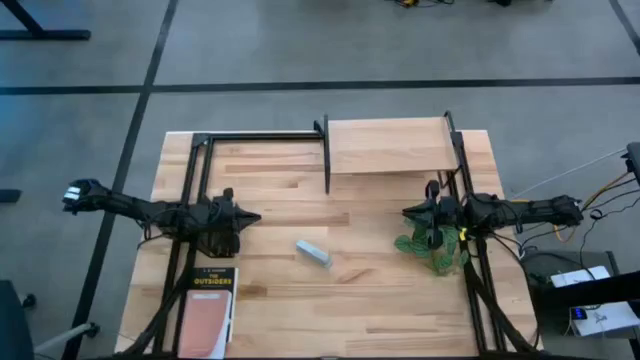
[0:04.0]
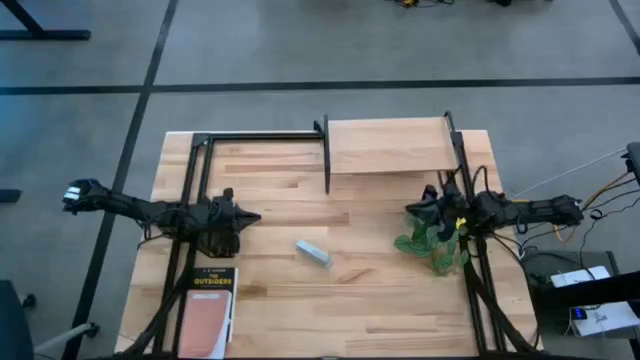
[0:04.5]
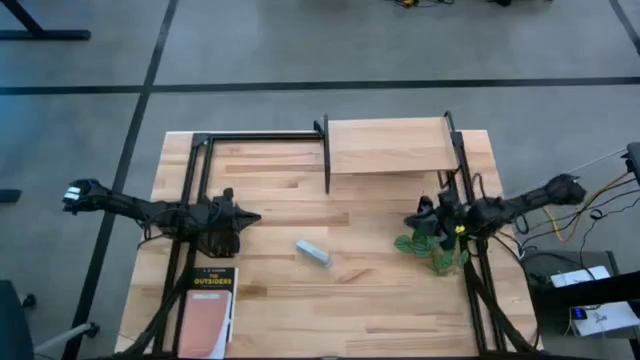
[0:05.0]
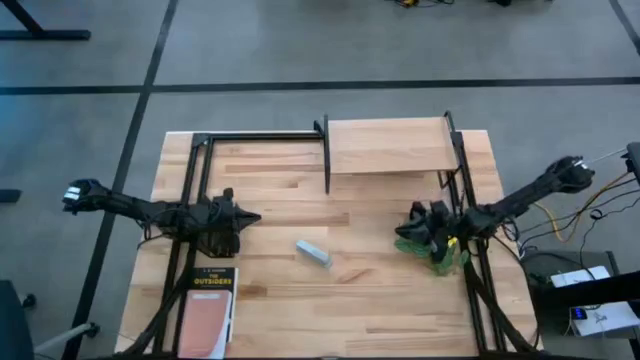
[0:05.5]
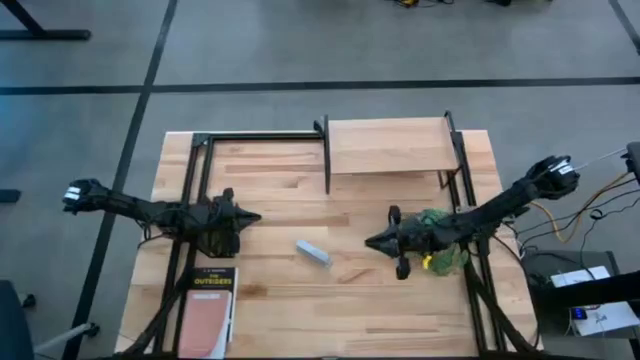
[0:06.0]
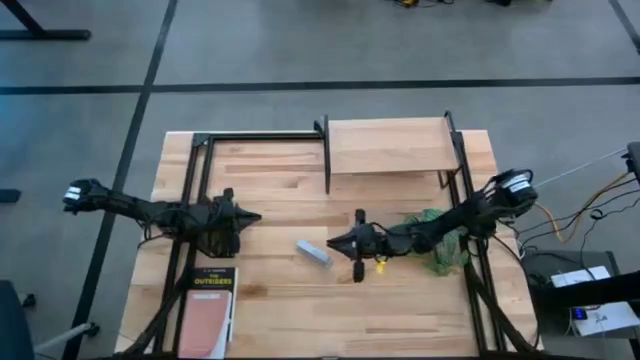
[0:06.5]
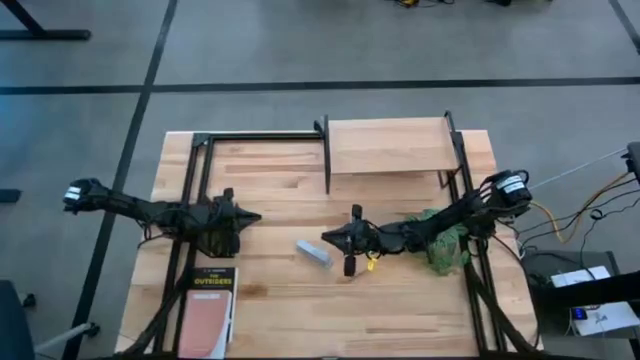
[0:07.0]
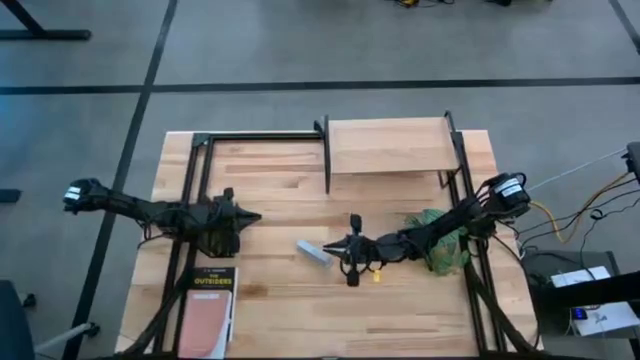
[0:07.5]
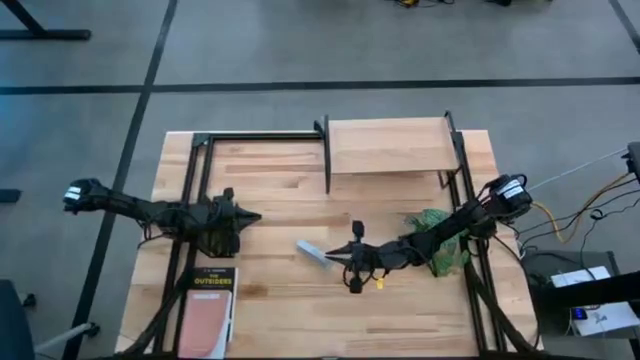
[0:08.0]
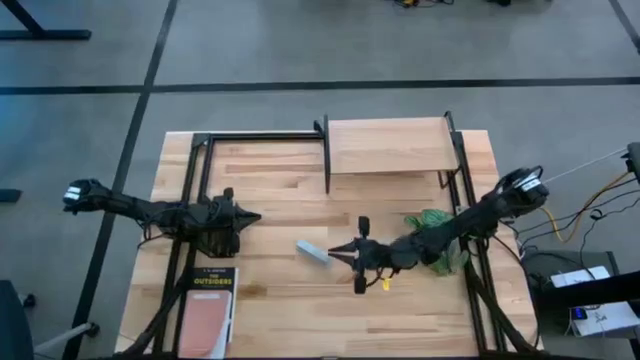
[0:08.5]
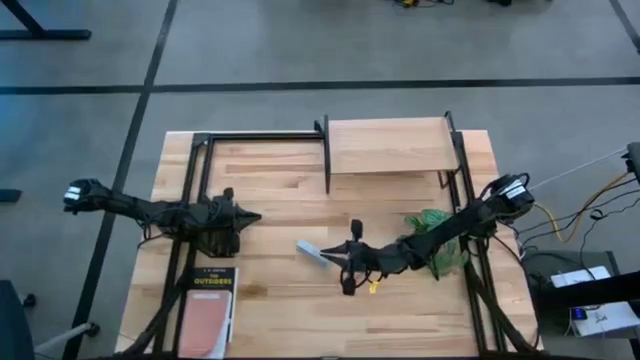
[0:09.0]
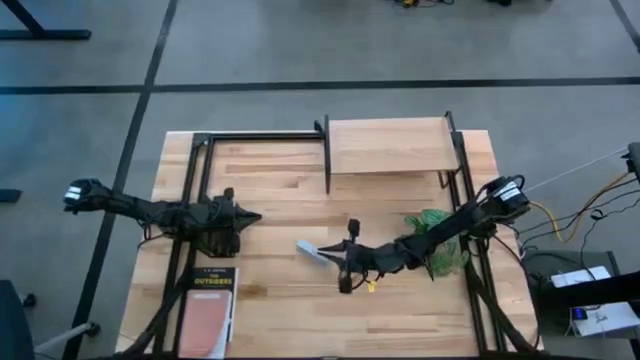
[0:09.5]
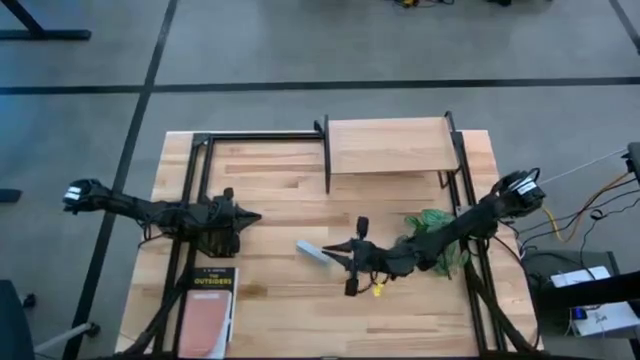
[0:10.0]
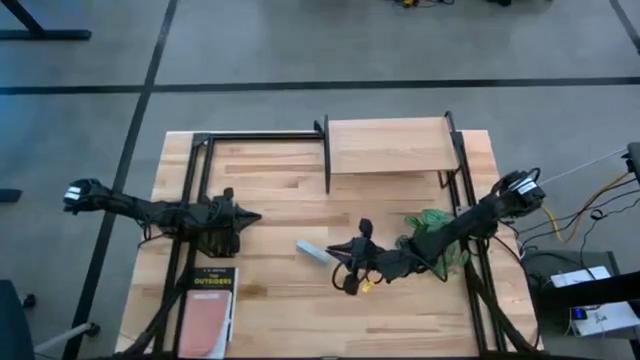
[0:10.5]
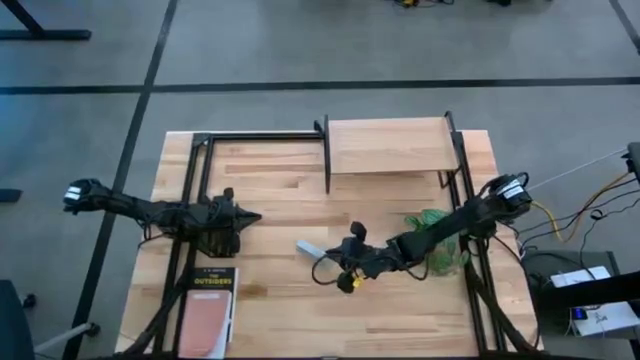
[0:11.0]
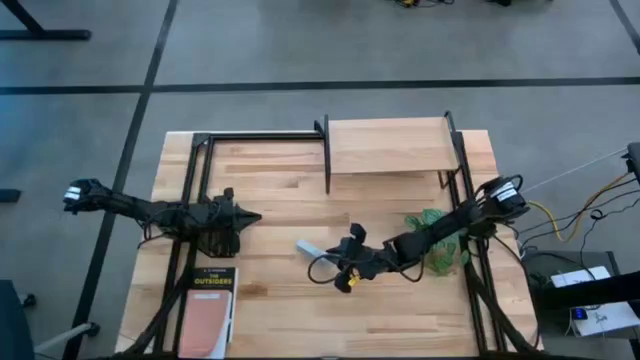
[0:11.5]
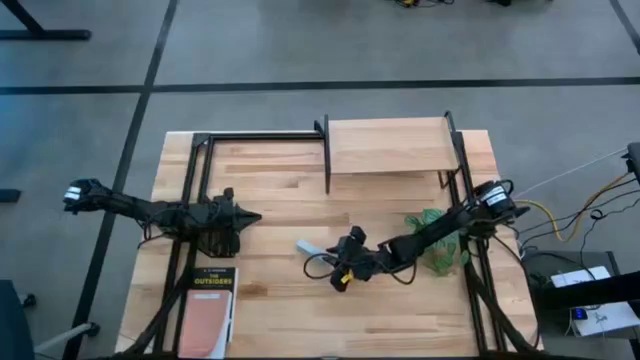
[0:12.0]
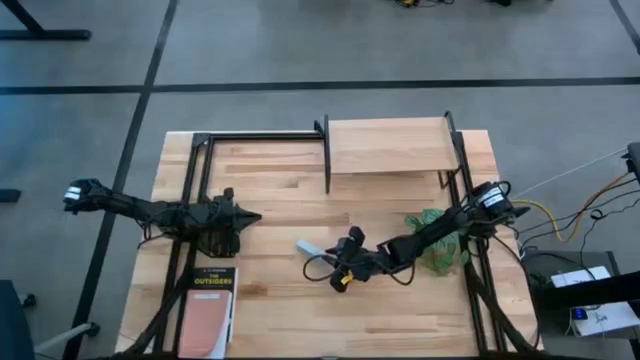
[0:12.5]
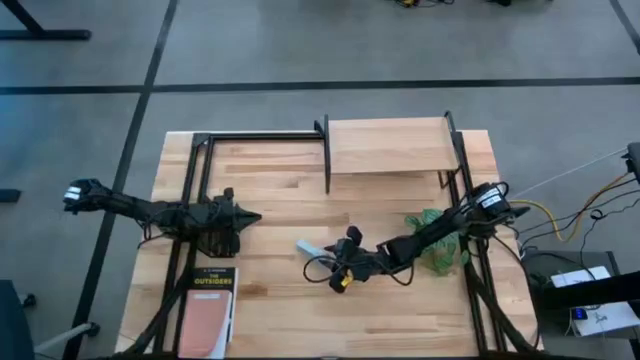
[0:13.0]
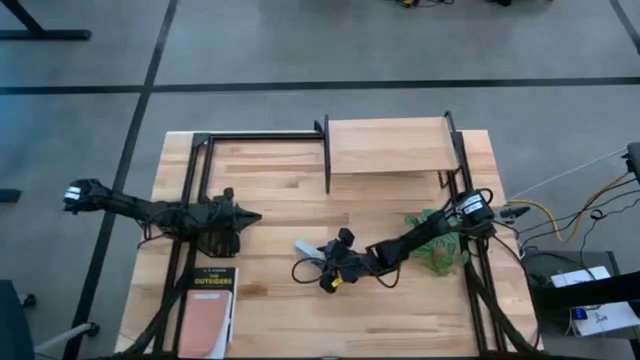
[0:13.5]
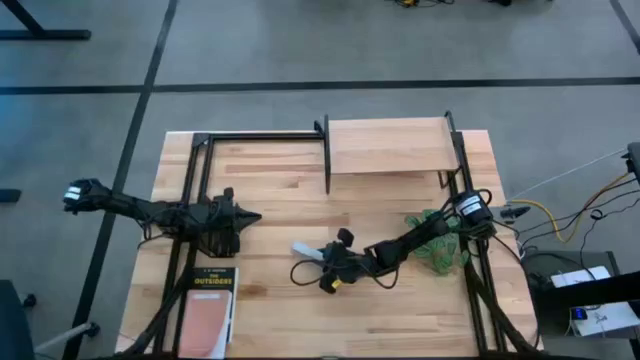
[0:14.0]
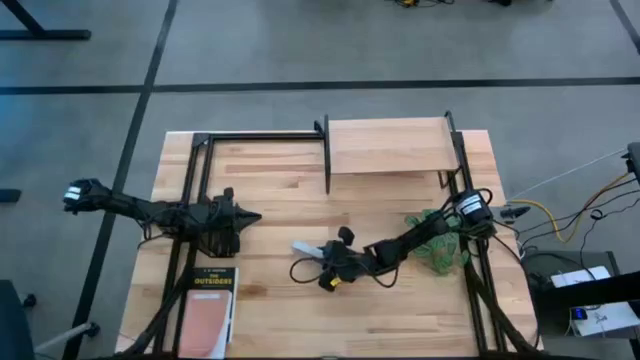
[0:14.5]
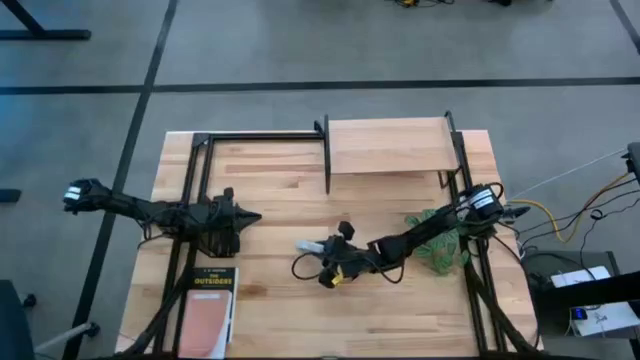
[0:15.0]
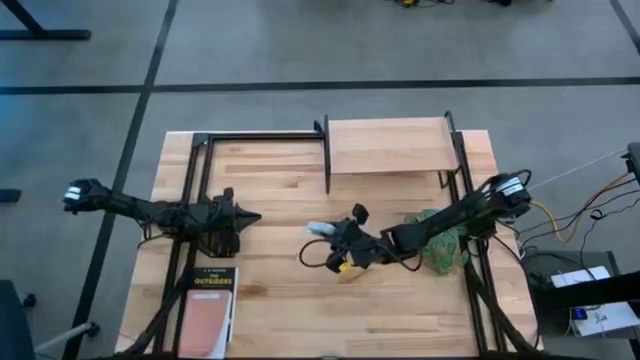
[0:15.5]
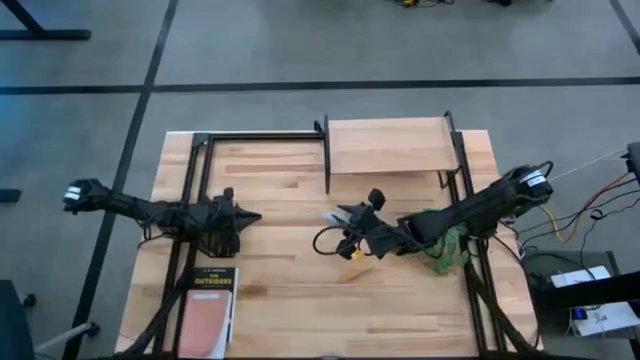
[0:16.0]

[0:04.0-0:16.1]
Task: Stock shelves
Put the gray stapler on the shelf

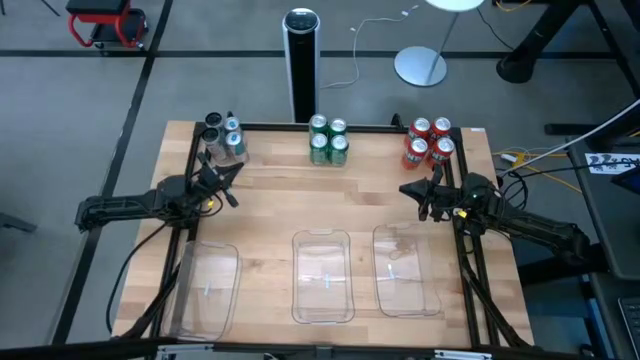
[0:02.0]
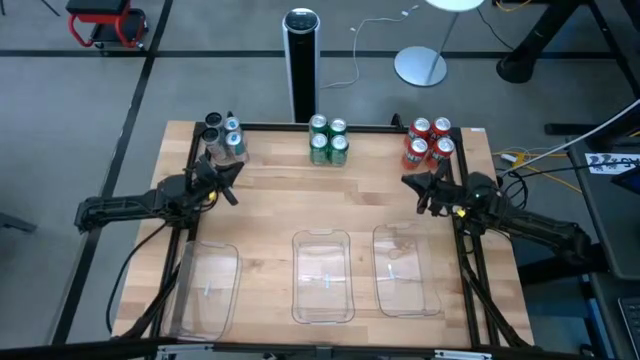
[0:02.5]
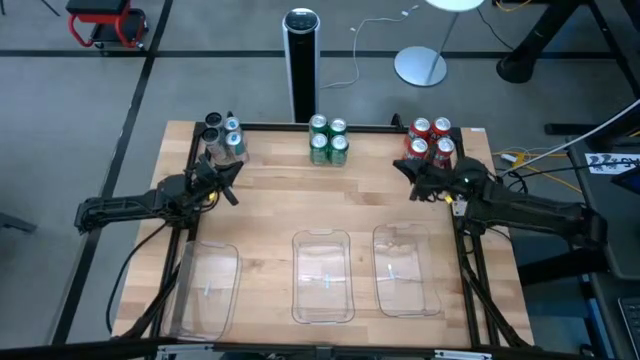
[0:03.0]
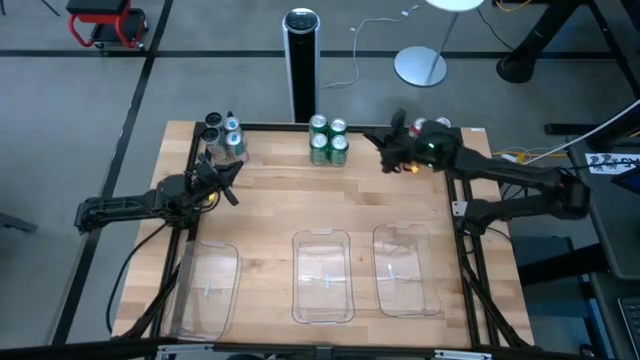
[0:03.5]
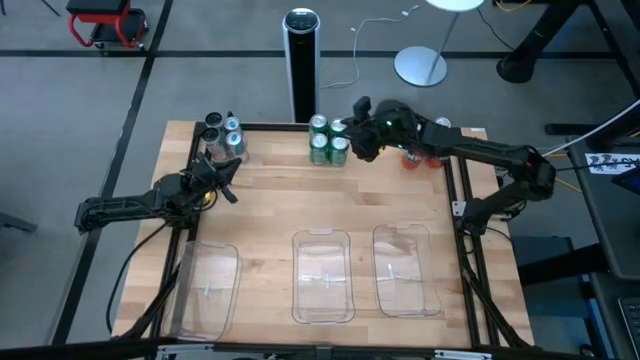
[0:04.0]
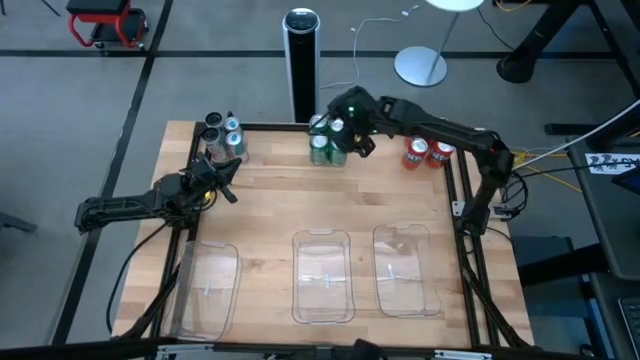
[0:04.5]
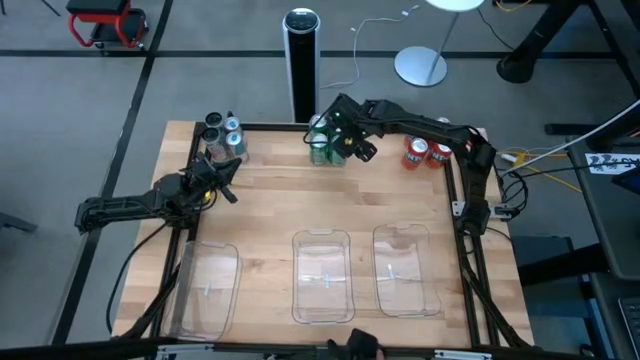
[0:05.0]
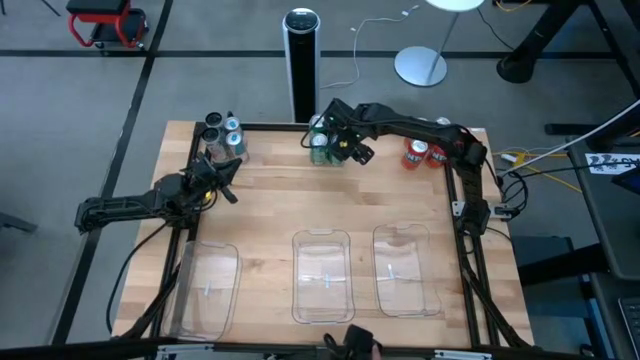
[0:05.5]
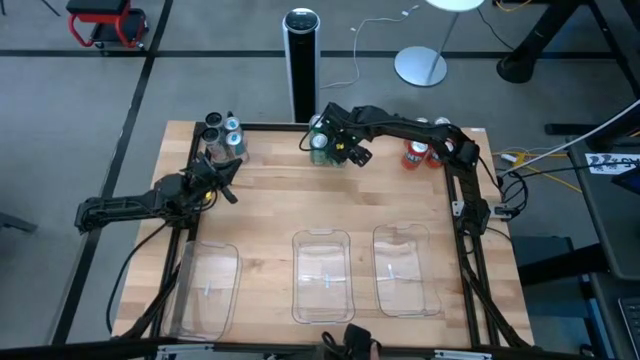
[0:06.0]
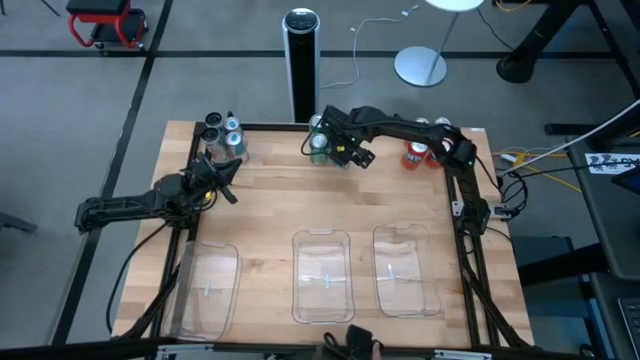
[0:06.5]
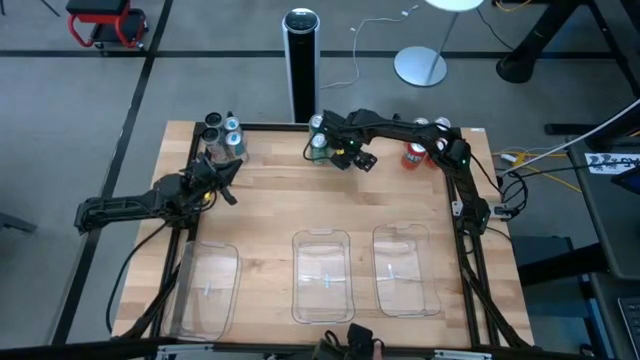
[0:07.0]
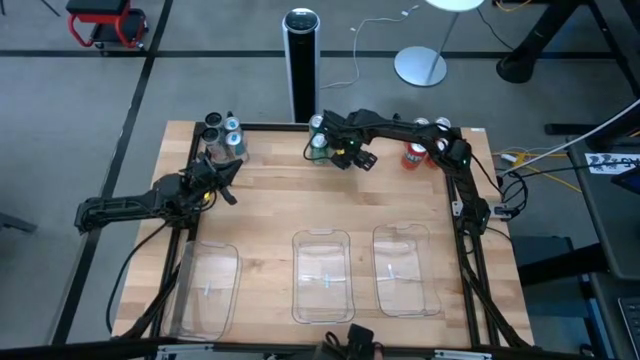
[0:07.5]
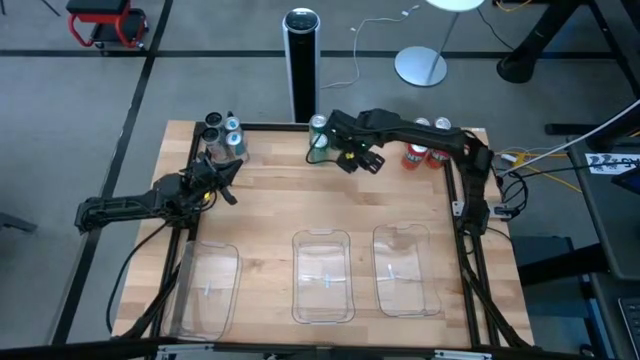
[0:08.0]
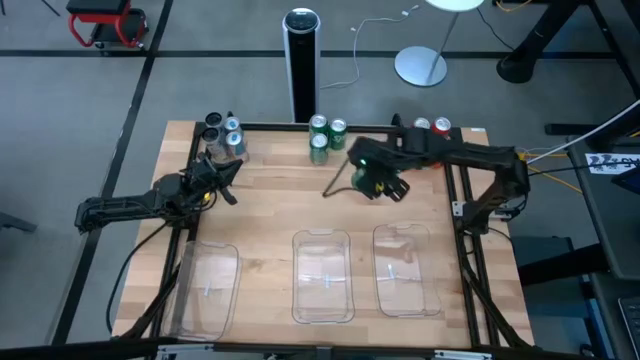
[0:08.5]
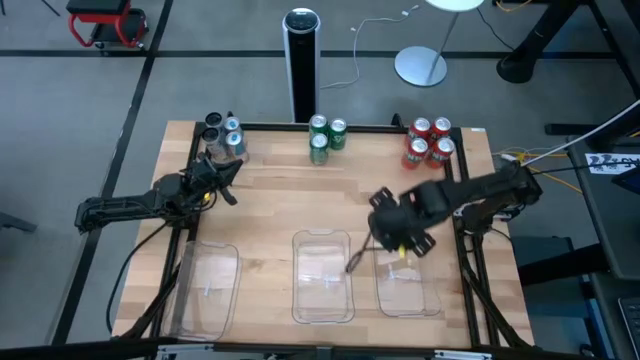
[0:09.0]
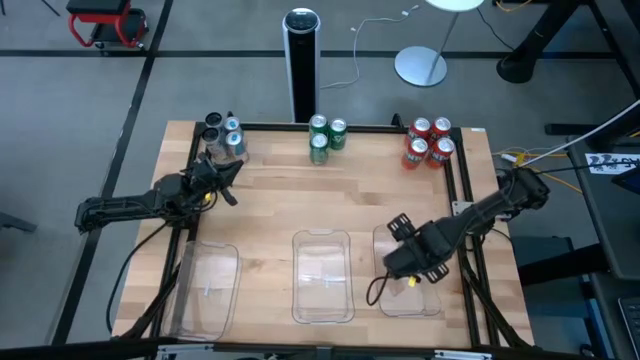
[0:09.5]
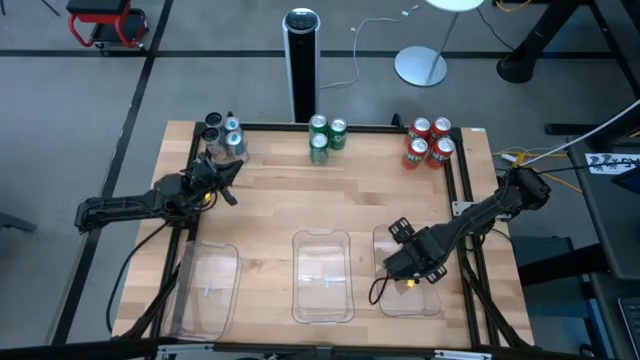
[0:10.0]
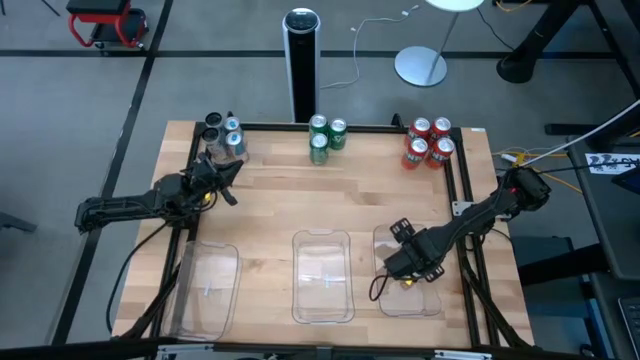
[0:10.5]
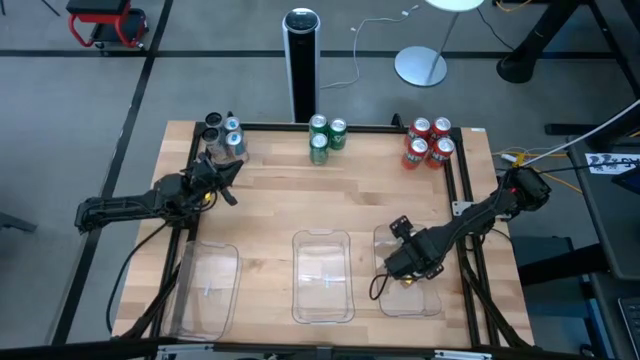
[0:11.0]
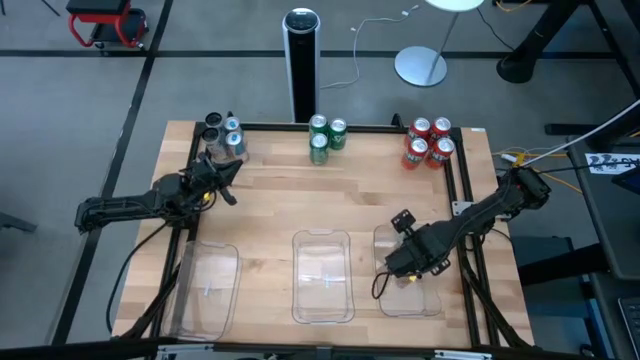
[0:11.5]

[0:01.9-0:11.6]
Task: Sort soda cans
Put the bottom right green soda can into the right transparent bin
